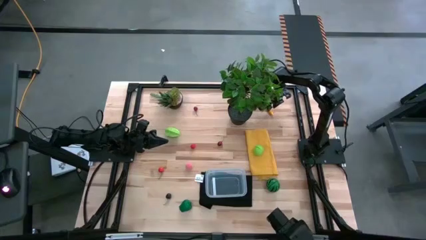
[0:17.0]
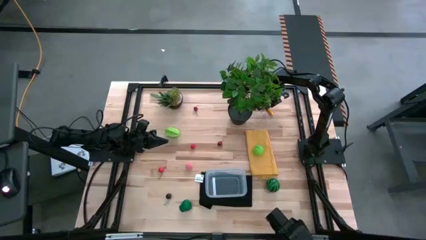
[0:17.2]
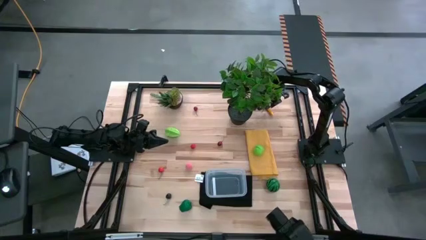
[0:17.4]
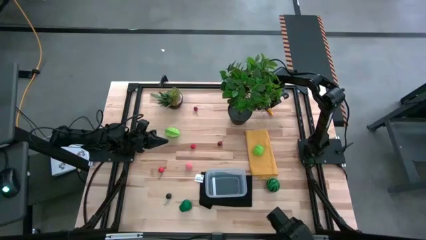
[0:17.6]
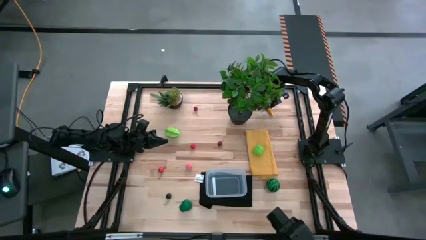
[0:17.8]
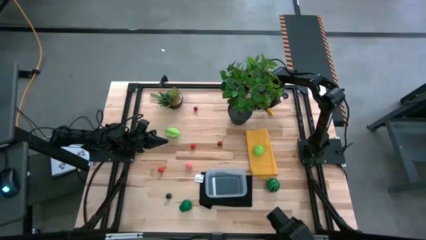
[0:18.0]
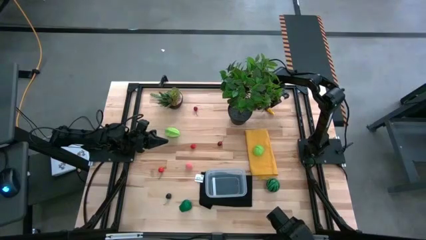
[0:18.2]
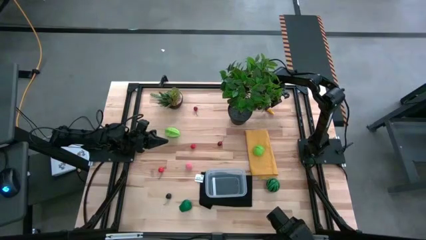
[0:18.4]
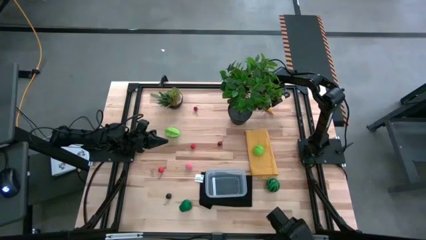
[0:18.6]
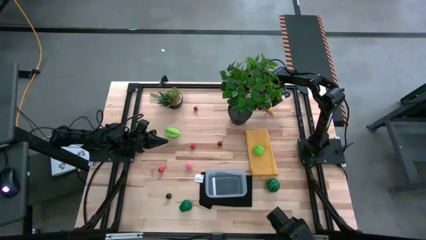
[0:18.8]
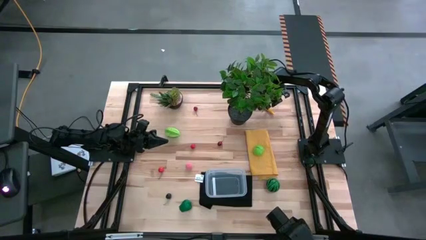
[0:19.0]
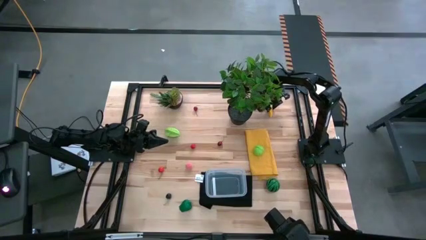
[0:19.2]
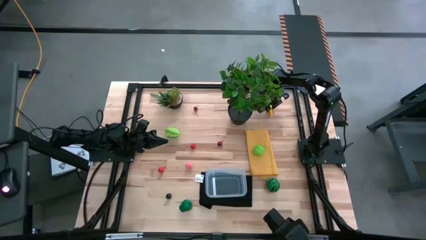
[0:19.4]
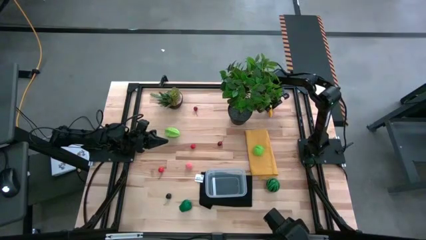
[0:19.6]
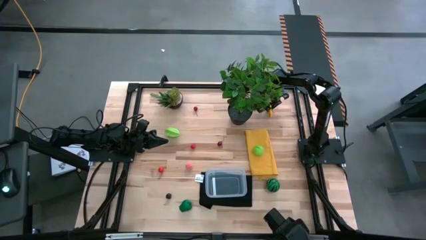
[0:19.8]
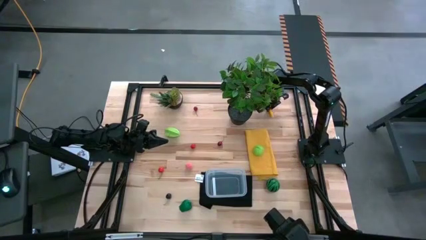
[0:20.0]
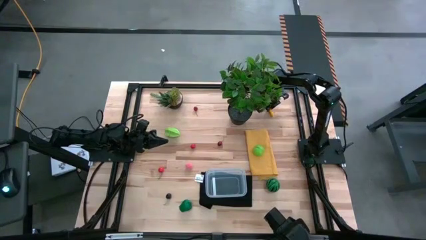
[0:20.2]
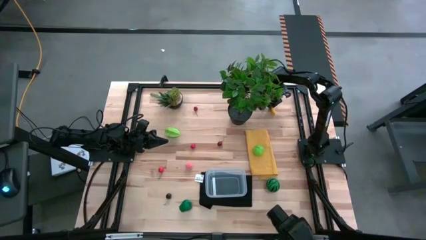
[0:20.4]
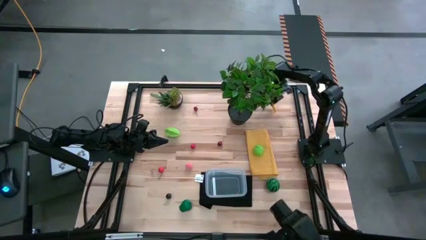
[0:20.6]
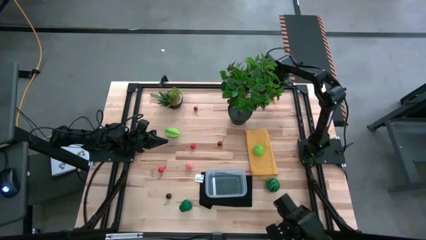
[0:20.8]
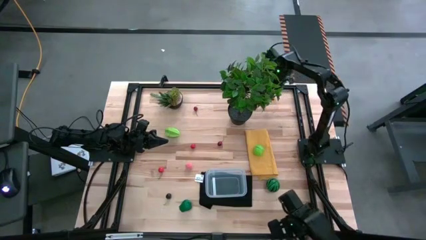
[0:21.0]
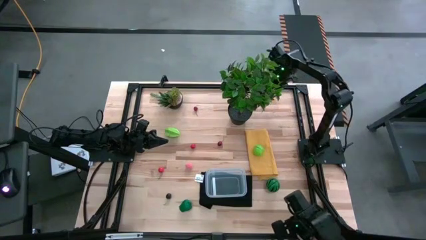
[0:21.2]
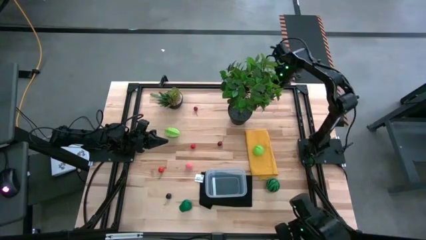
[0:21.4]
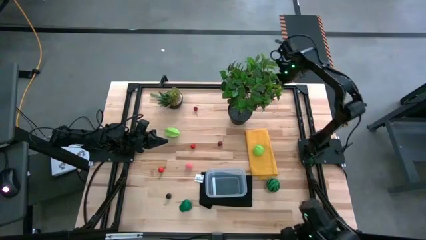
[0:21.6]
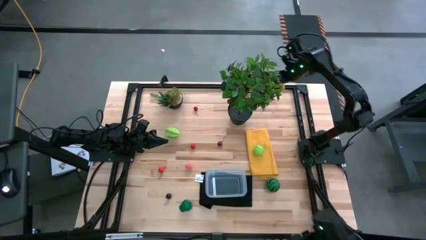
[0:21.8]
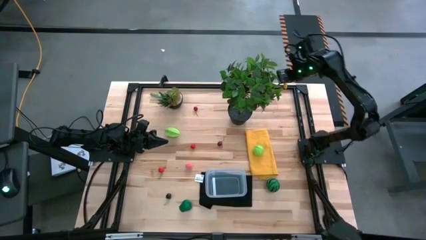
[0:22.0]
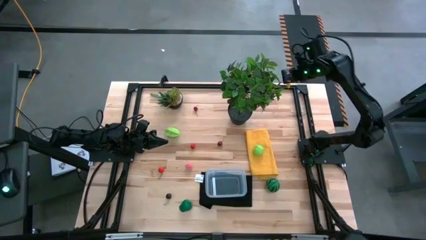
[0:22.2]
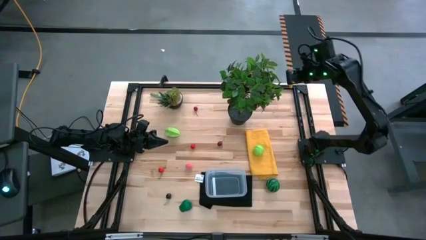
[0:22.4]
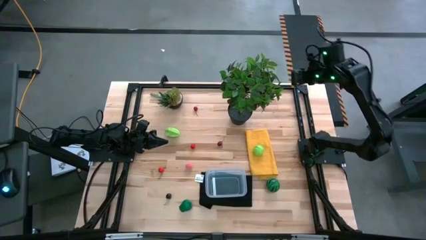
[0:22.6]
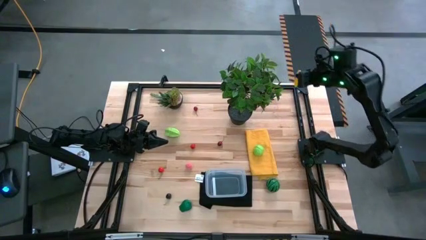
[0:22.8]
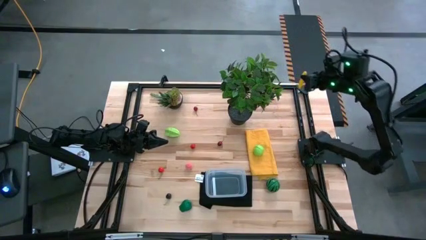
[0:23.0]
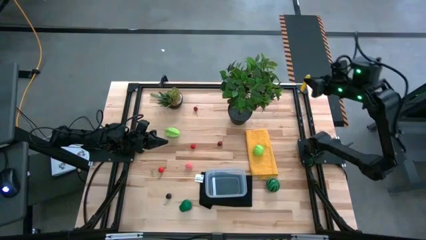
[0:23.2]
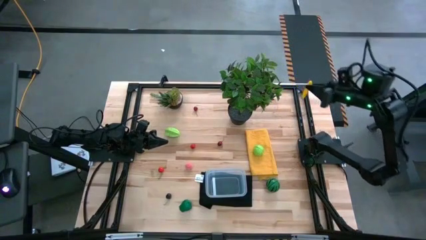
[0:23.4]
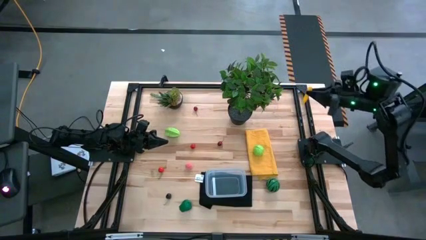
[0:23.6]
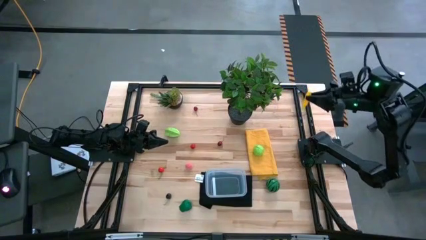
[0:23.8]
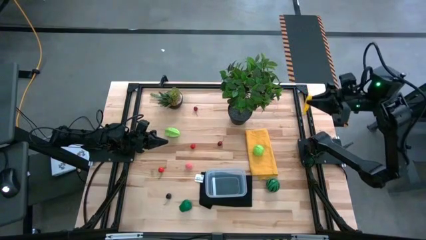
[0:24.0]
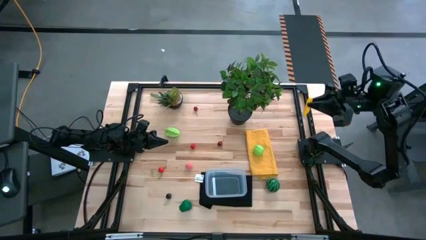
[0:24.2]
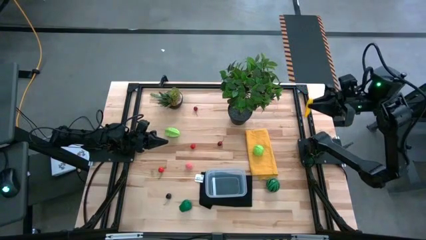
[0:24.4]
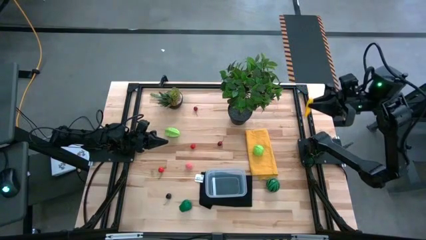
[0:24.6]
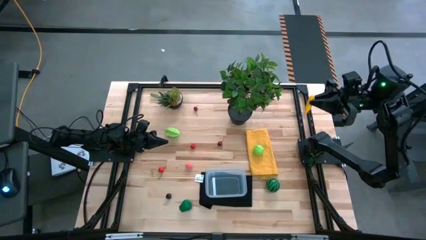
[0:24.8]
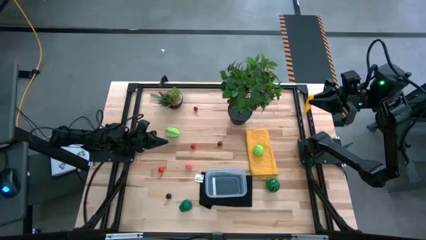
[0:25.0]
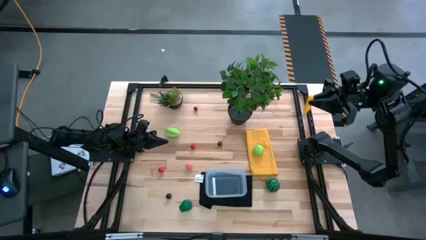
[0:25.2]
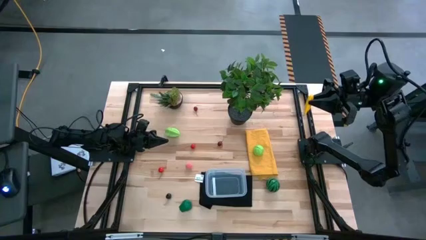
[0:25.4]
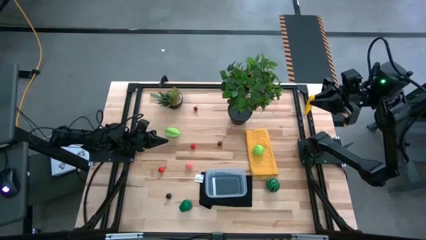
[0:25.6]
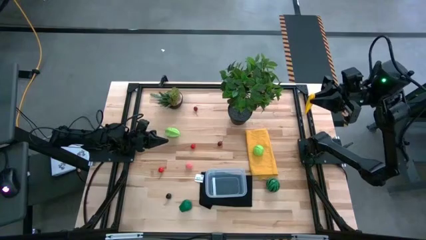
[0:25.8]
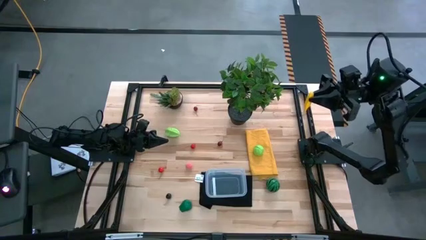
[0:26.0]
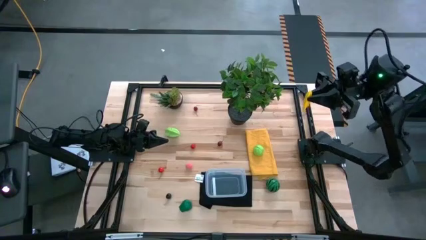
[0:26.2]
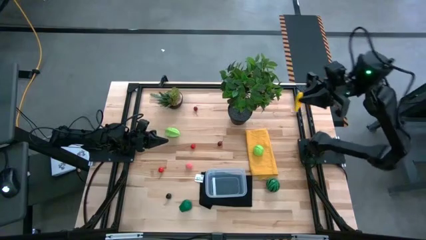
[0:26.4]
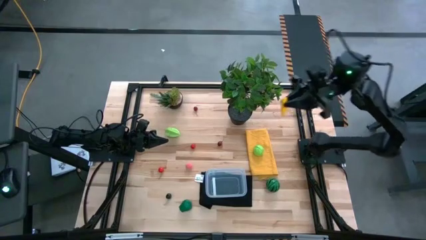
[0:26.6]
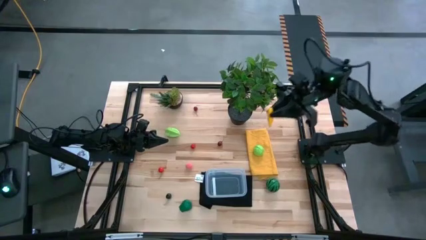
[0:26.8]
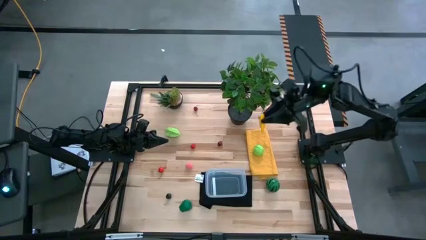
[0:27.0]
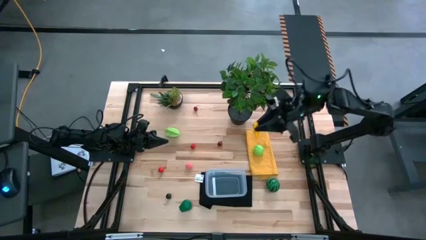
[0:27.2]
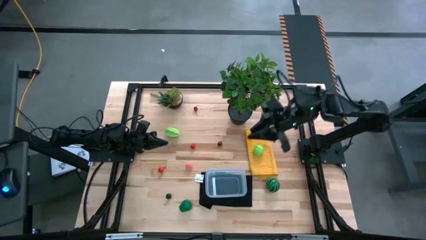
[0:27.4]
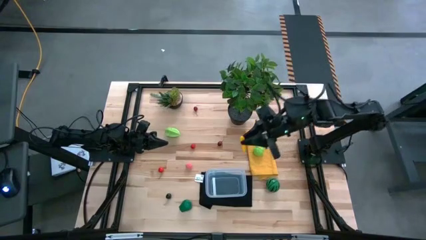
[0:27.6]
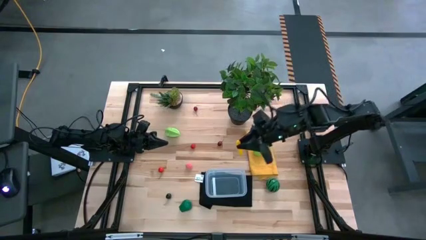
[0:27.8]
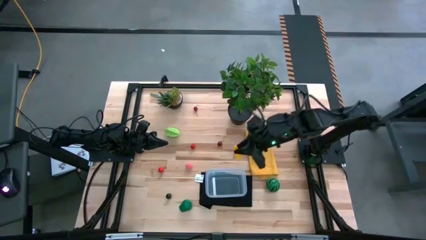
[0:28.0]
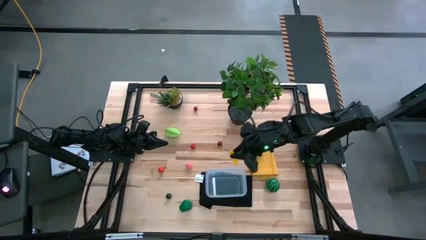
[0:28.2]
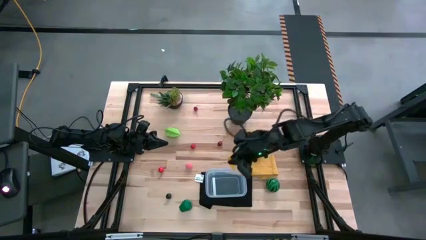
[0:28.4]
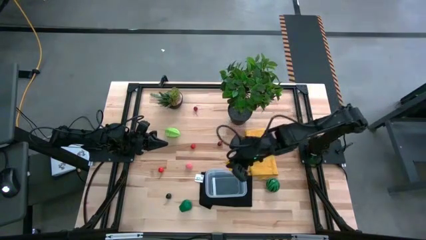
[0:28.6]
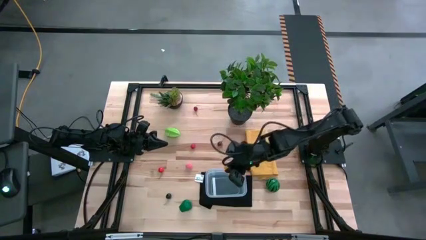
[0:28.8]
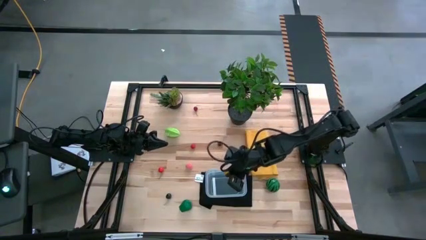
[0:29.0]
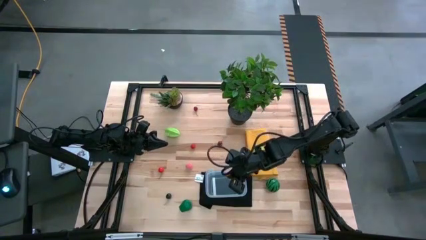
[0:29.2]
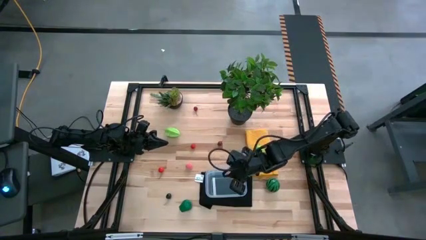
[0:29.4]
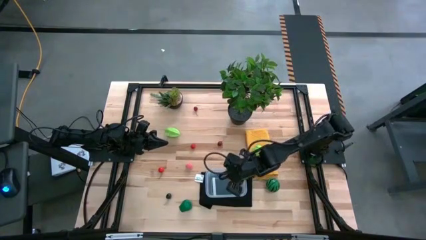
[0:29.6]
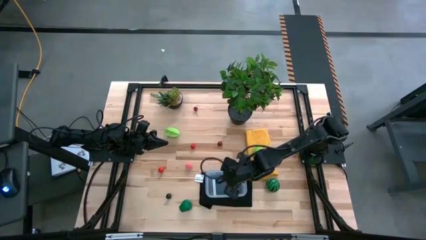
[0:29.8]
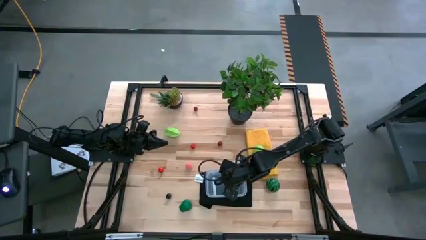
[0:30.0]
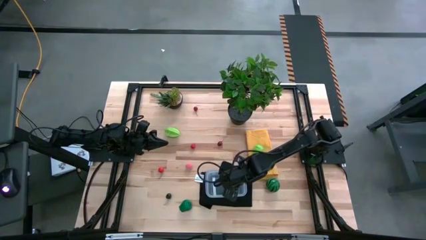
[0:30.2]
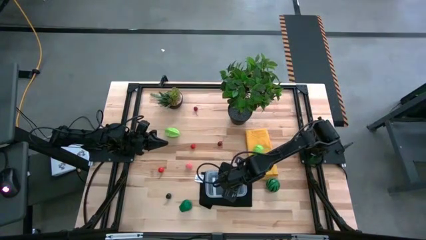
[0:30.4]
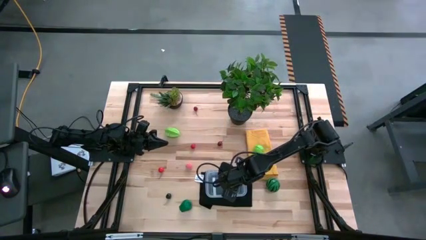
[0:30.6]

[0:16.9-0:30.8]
Task: Pick and placing Produce into tupperware
Put the corn into the transparent bin

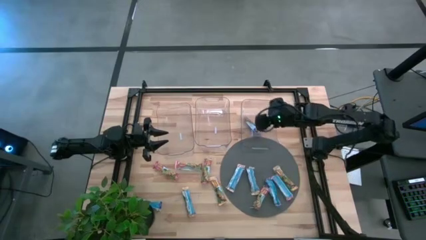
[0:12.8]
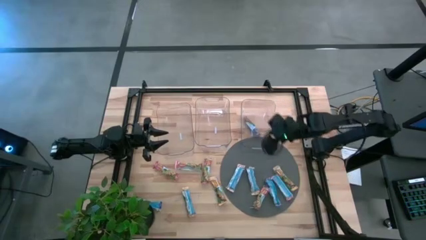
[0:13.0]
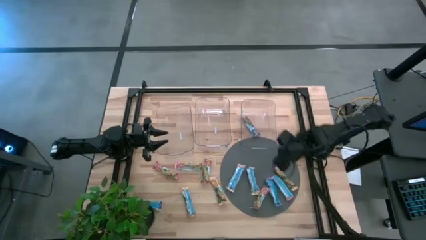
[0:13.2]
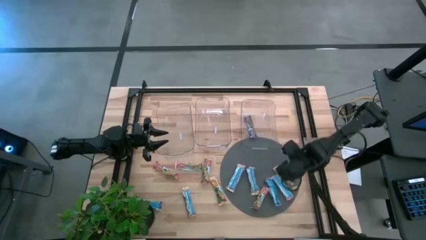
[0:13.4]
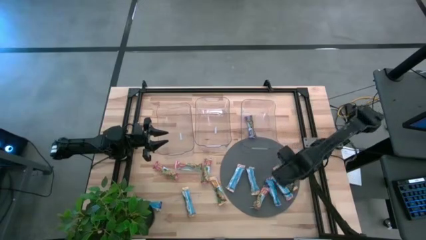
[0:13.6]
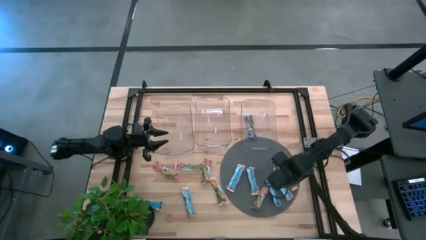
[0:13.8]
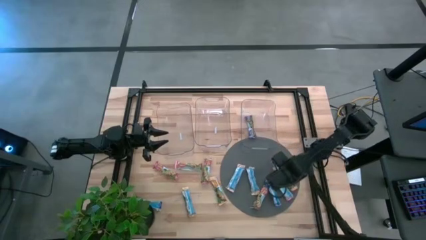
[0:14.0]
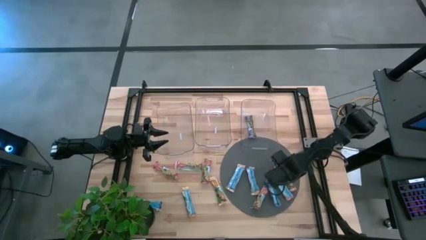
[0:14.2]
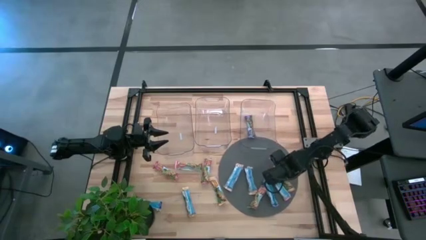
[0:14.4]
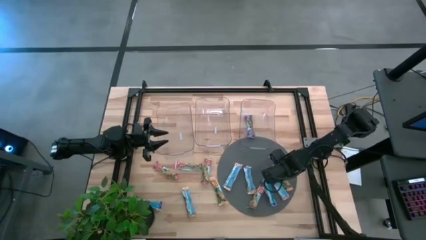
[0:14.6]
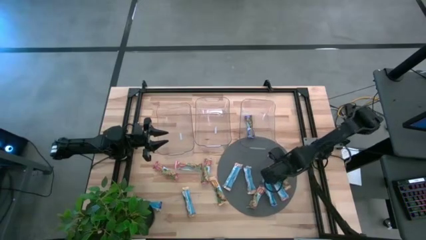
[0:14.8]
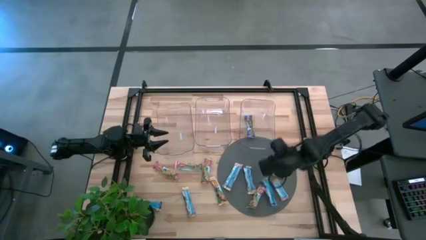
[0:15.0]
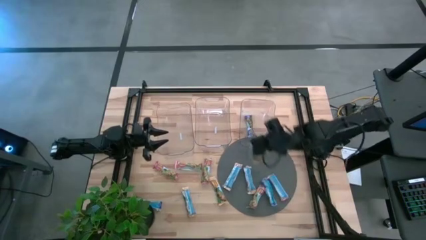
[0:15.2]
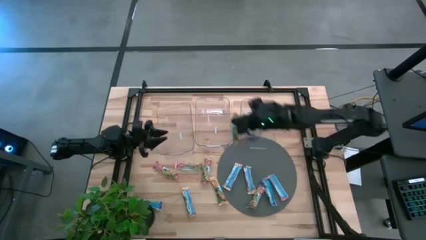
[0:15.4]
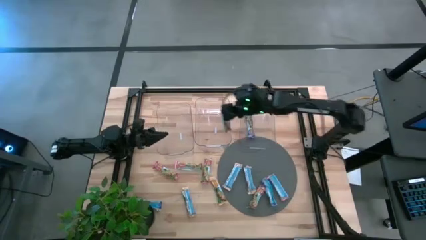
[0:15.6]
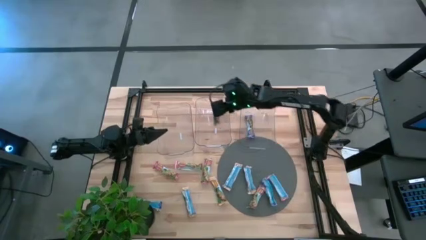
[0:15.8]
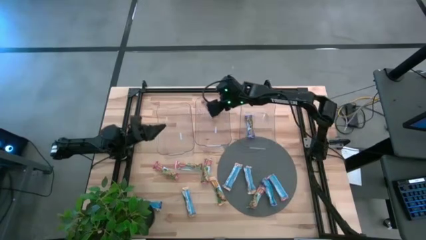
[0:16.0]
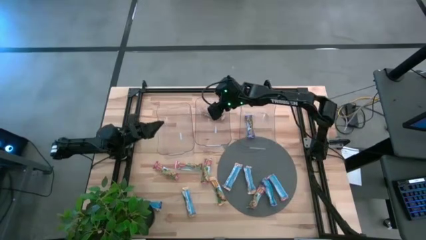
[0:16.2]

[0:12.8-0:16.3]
Task: Pick and place Granola Bars by type
Put the orange snack bar into the middle transparent bin
